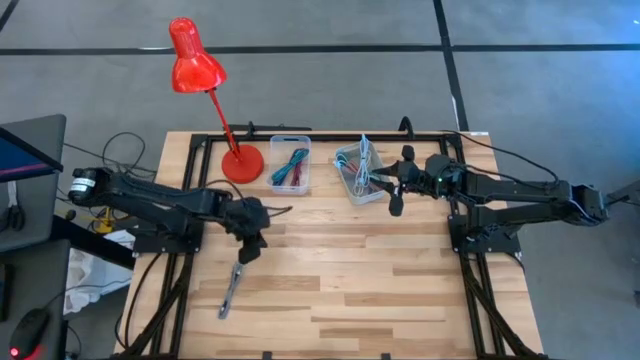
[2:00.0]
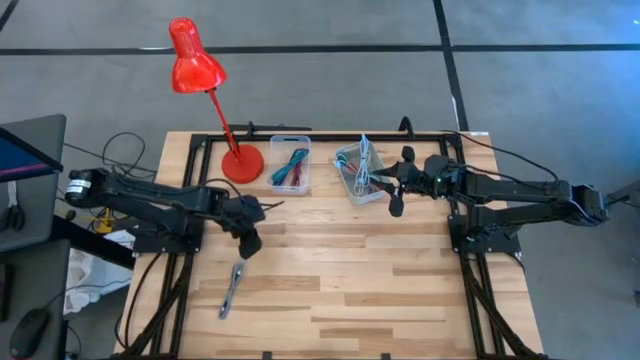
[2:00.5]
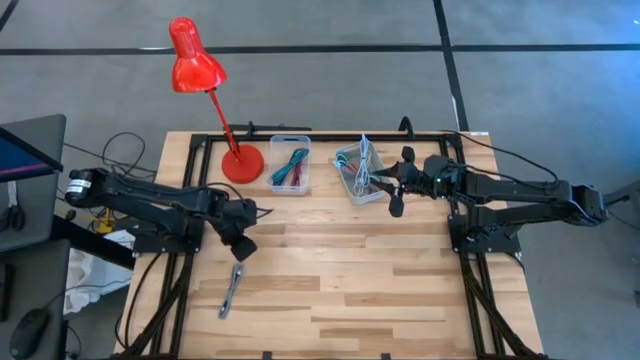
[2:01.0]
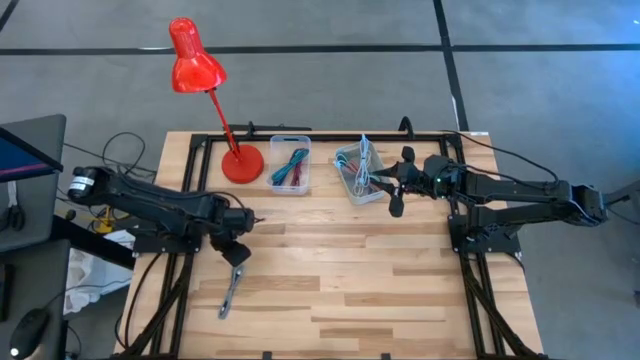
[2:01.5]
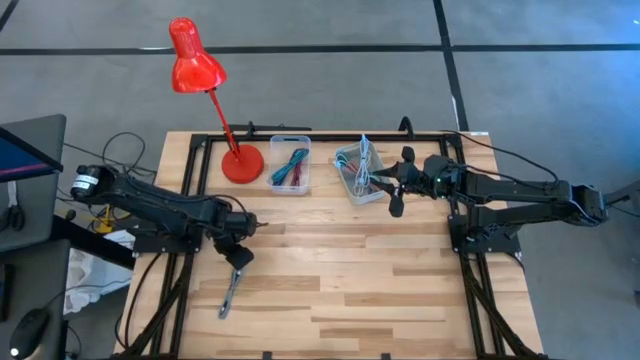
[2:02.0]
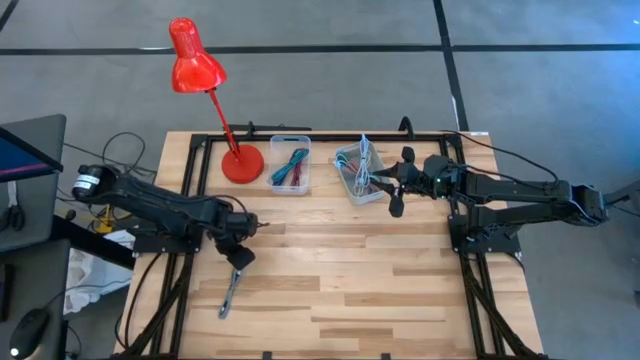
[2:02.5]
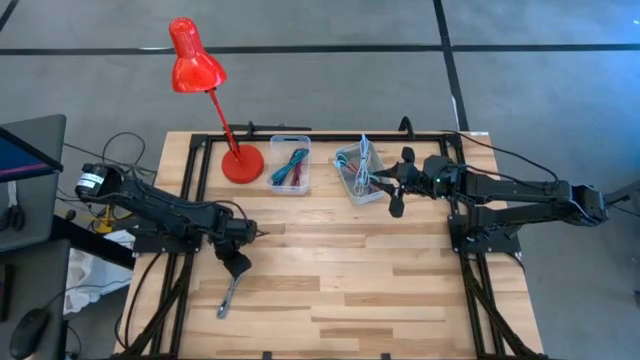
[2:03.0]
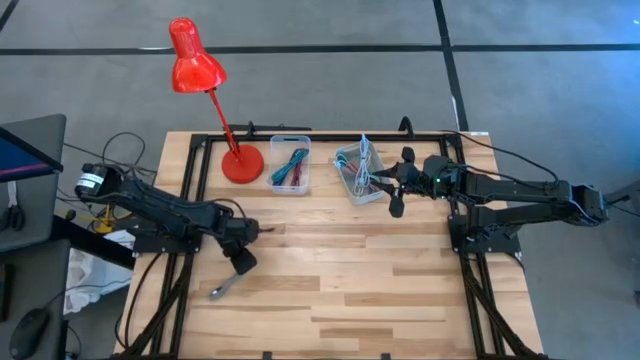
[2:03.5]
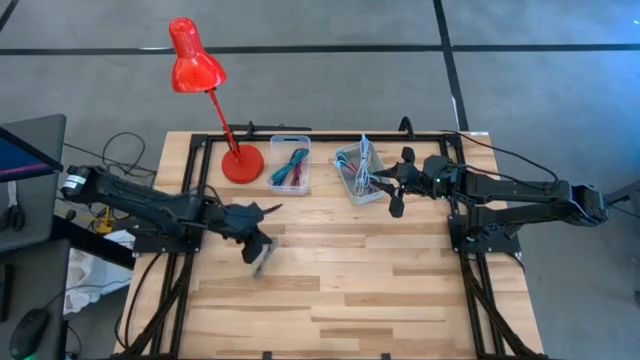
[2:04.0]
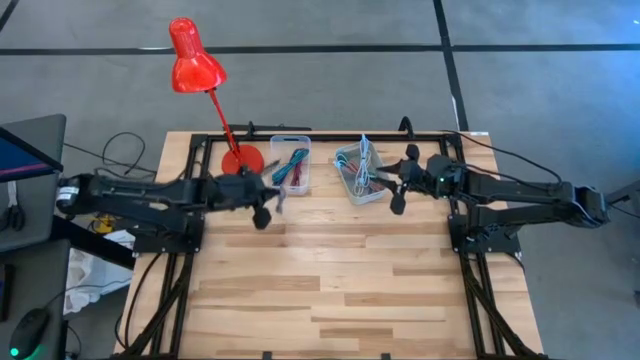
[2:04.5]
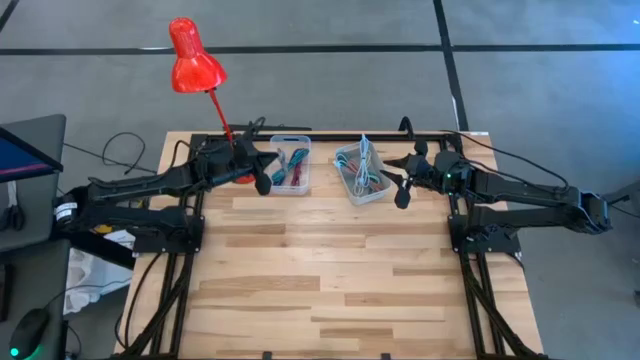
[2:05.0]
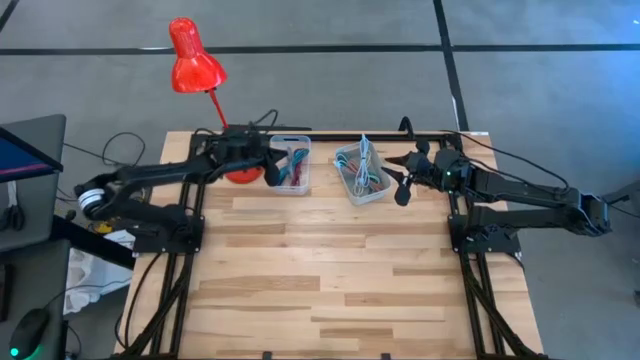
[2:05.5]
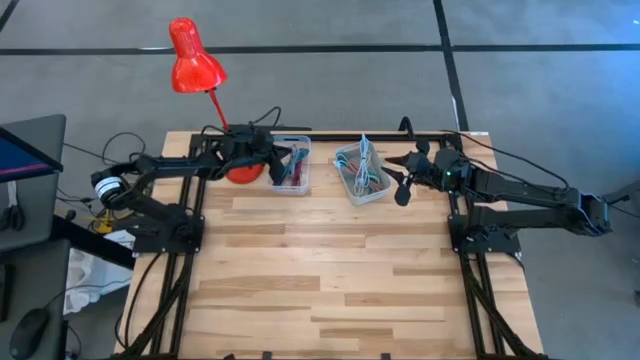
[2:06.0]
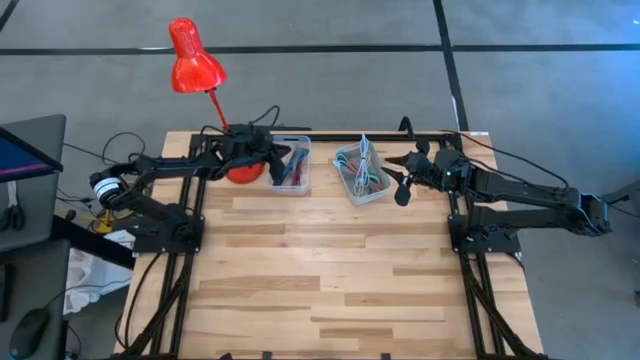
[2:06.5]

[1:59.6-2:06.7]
Task: Pick & Place USB Port
Put the black patterned USB cable into the transparent bin

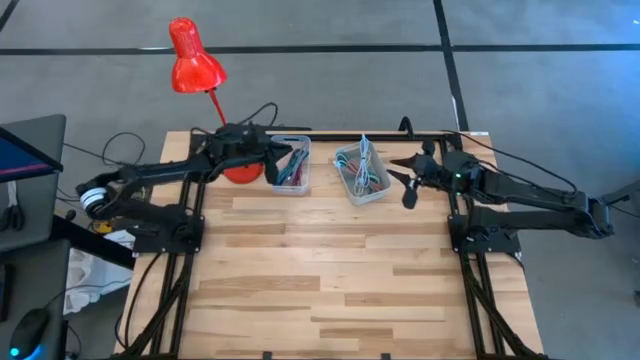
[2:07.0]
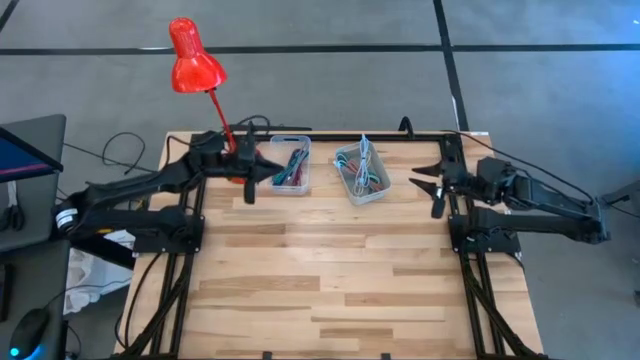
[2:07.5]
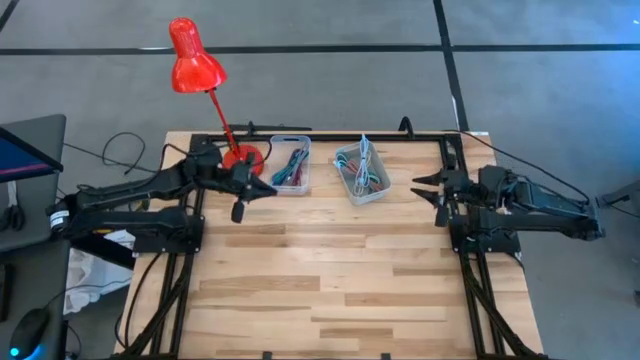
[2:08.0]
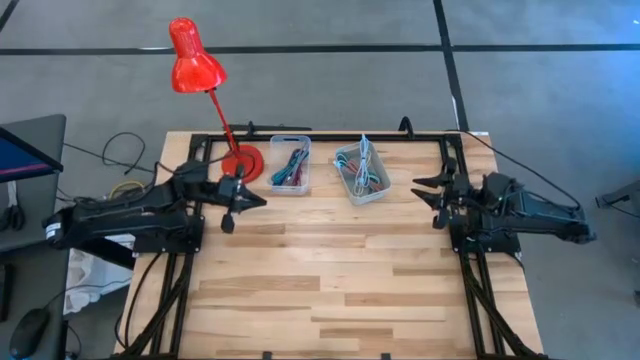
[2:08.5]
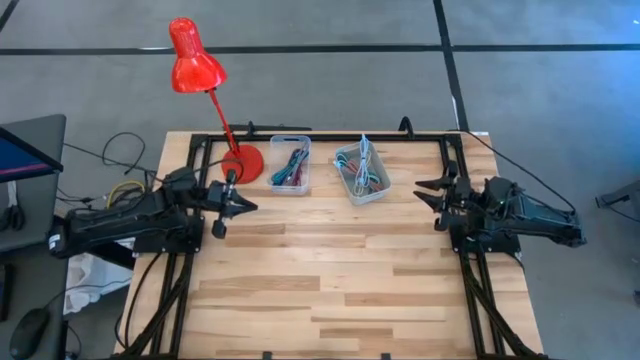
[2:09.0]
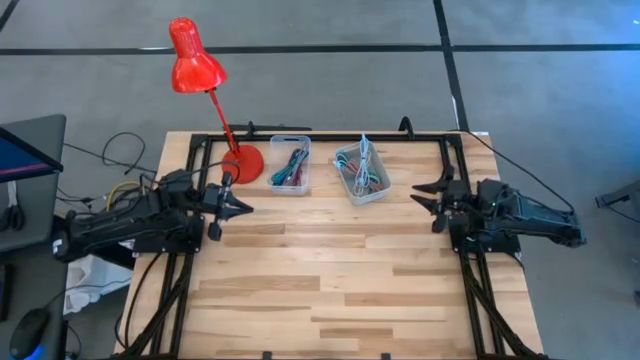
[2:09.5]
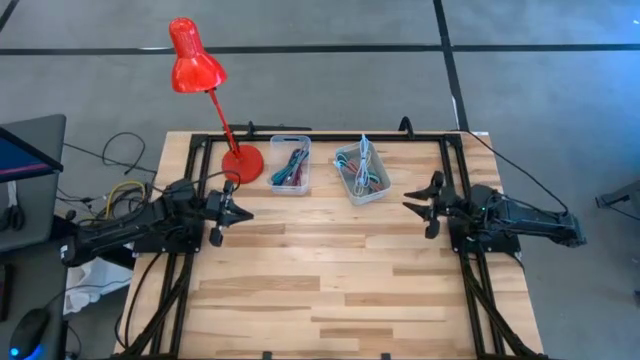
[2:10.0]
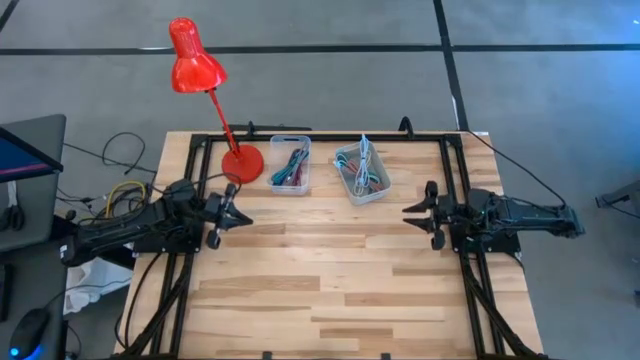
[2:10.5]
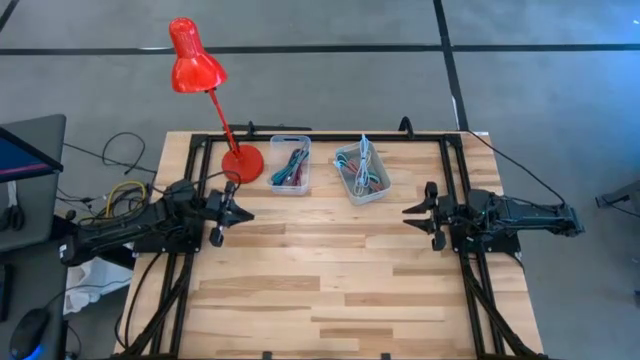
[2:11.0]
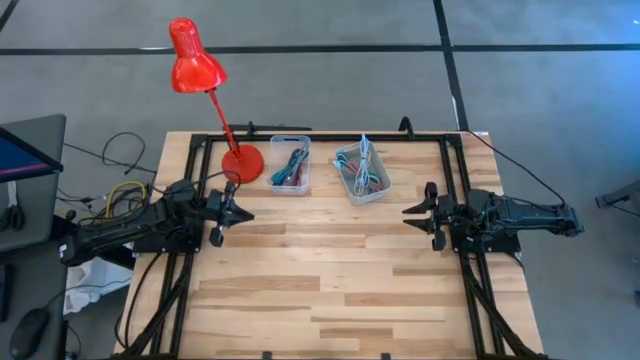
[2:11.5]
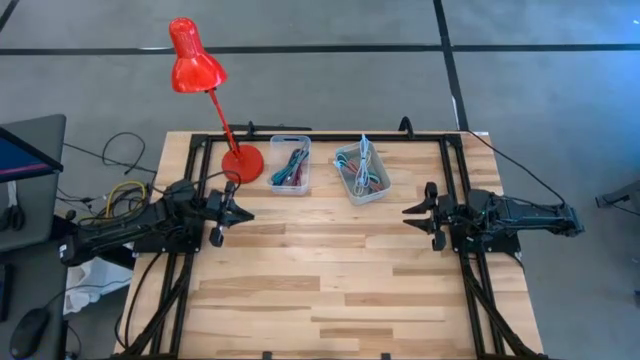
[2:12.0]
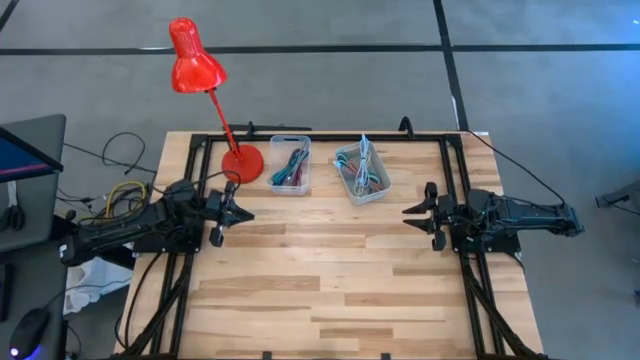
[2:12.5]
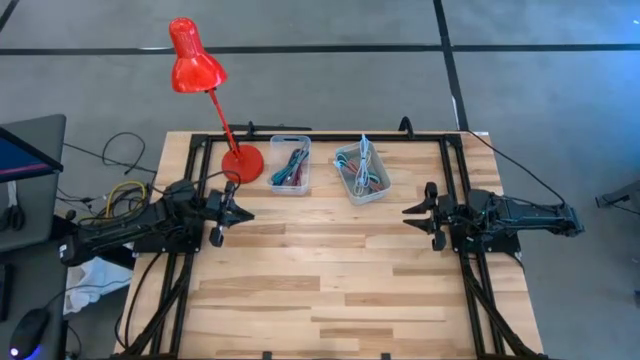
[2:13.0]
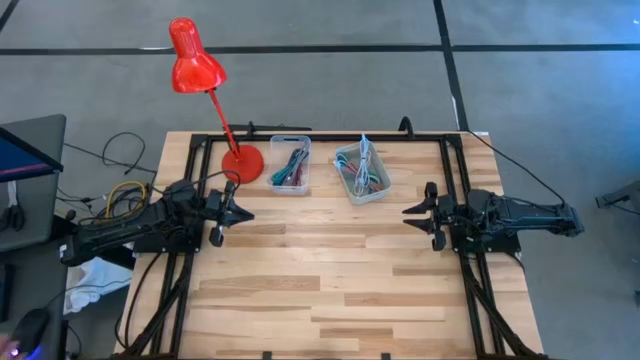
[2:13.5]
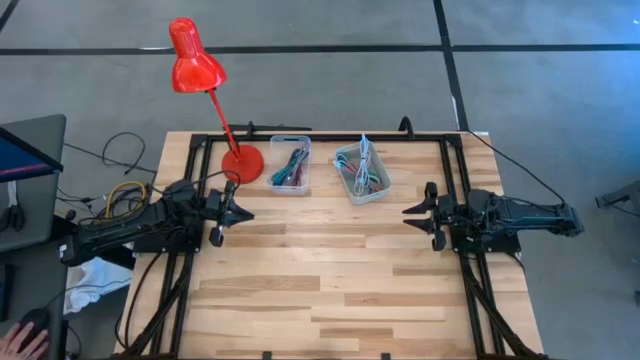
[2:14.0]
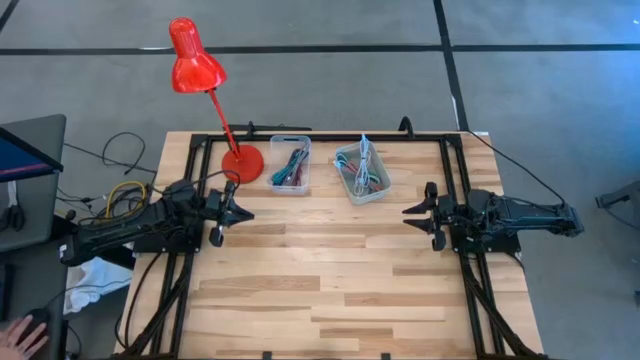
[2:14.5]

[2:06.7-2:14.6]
Return to Home Position

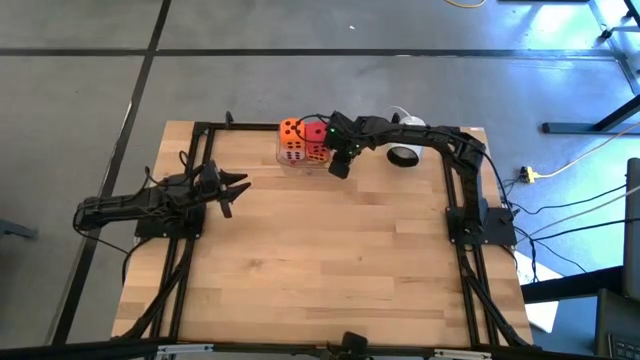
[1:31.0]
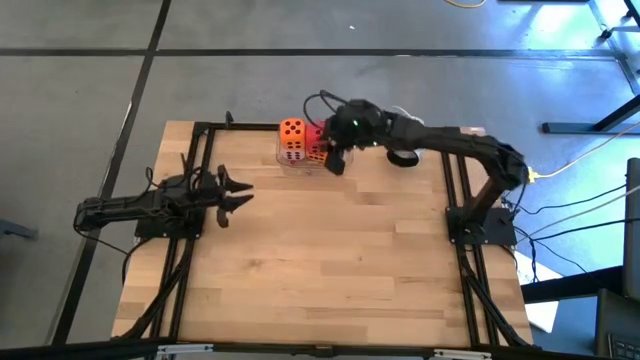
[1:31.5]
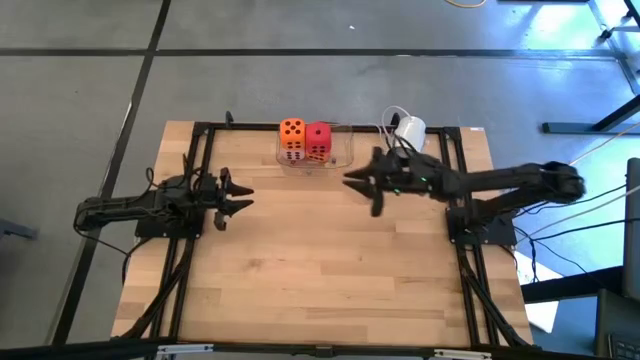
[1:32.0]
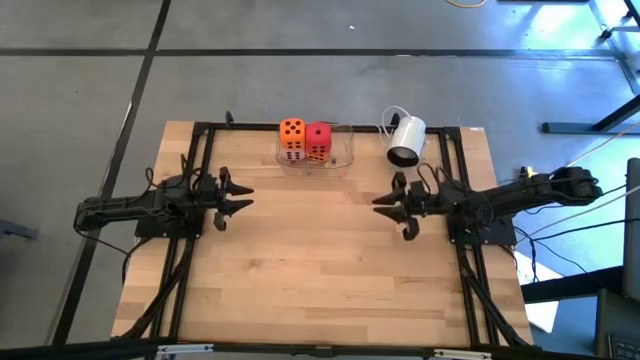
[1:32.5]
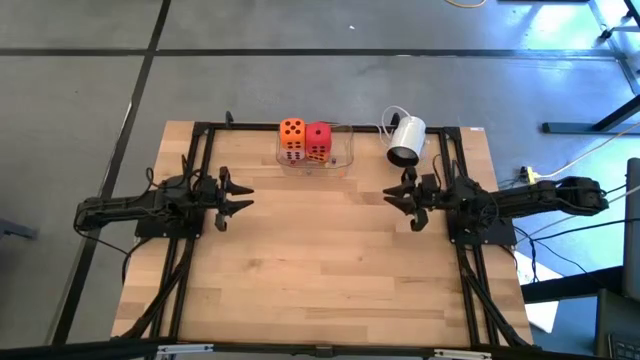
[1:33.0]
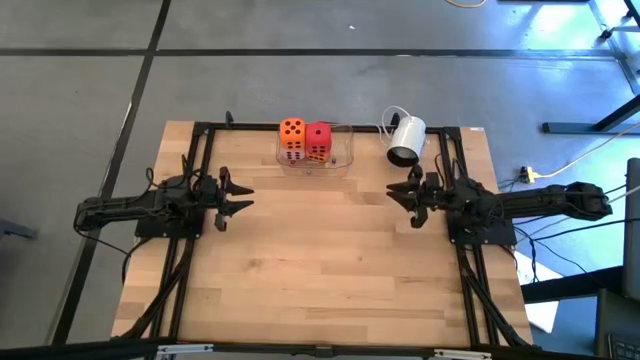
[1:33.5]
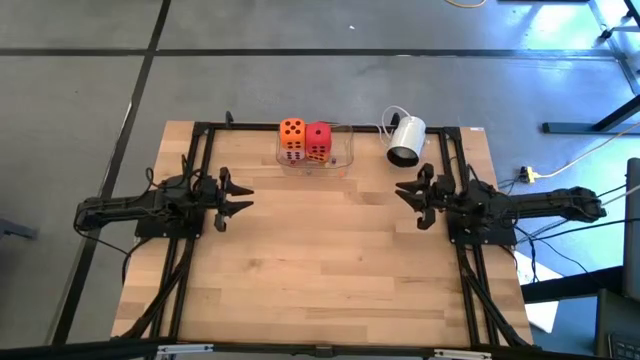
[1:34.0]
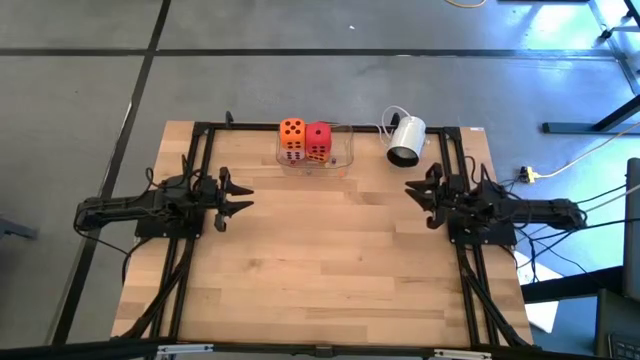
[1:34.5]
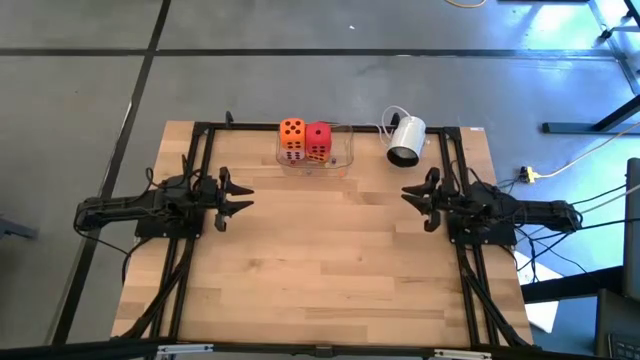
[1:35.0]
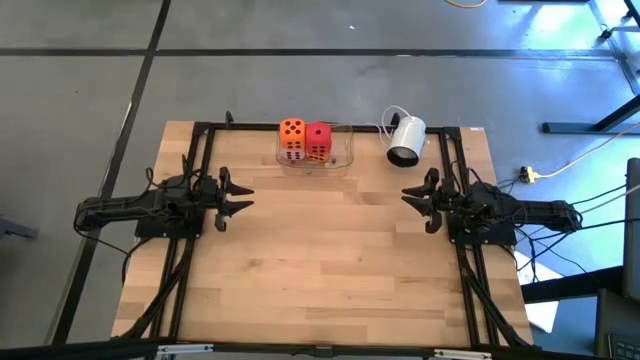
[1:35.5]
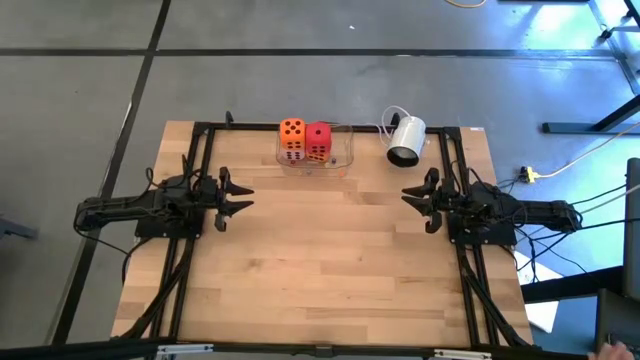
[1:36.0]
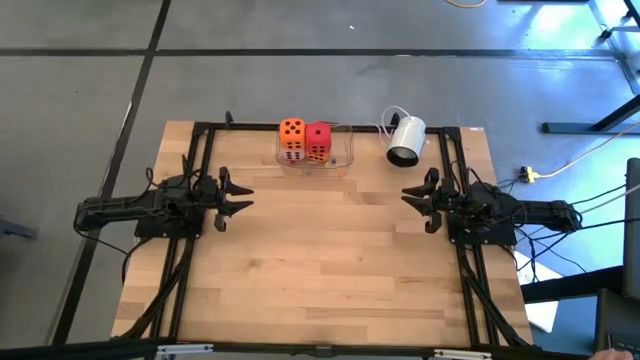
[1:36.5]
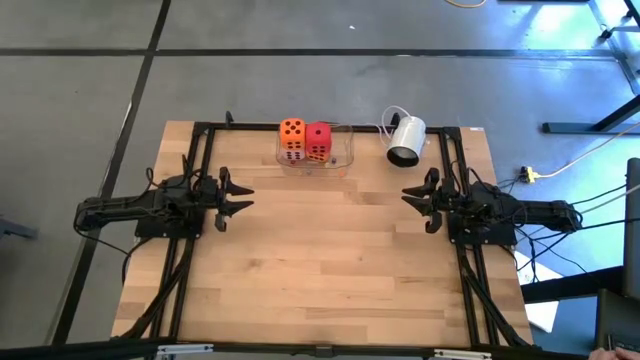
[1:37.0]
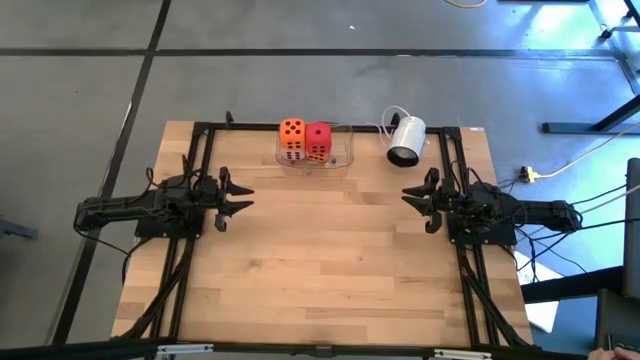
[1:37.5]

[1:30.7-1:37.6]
Task: Pick & Place Dice
Return to Home Position
